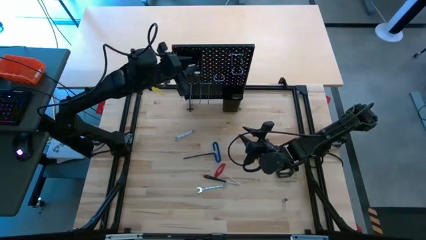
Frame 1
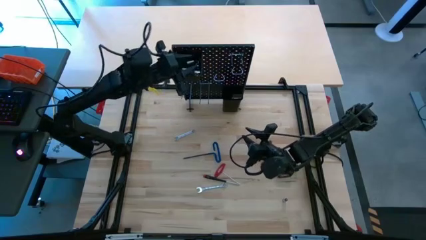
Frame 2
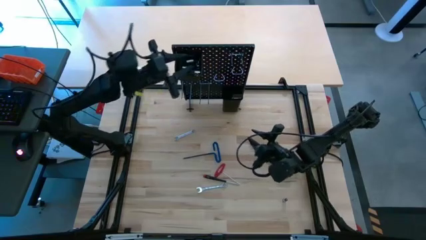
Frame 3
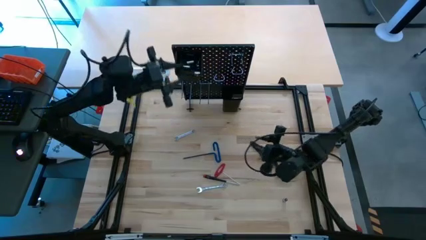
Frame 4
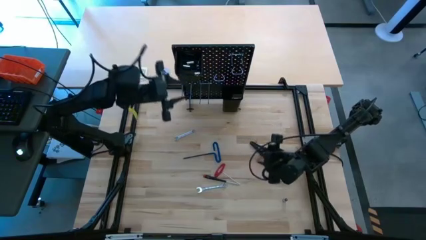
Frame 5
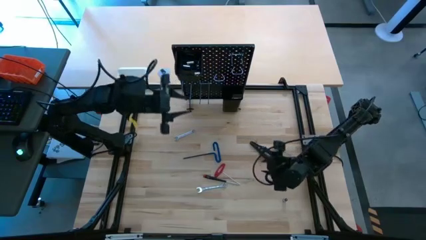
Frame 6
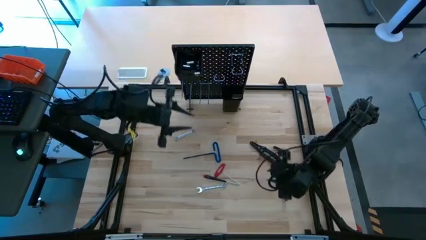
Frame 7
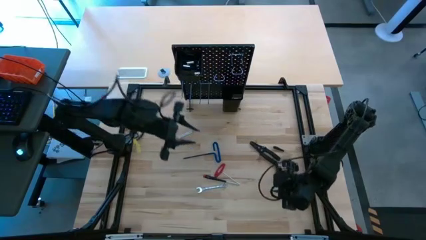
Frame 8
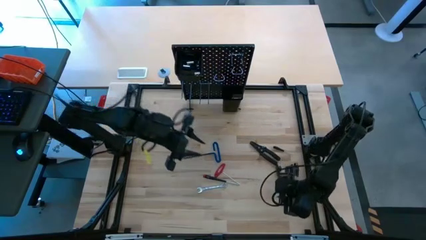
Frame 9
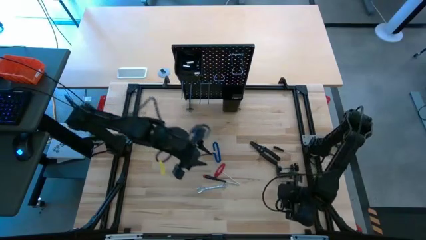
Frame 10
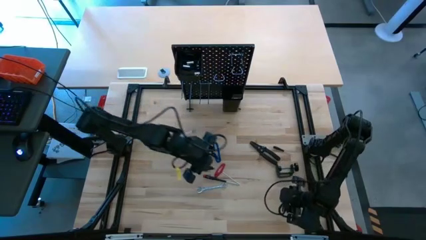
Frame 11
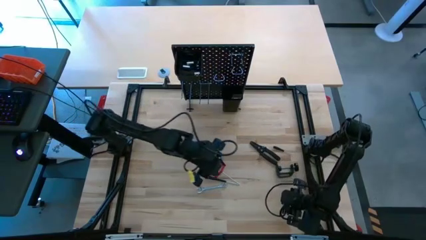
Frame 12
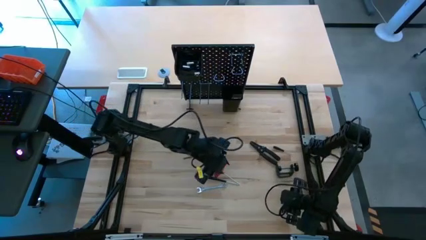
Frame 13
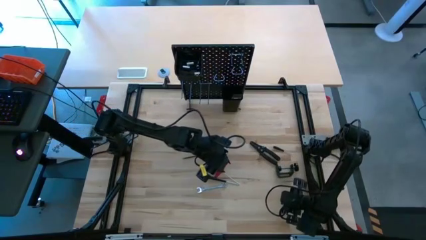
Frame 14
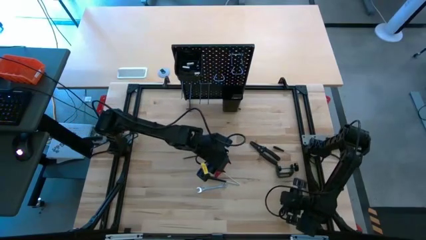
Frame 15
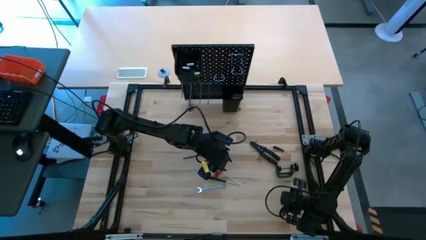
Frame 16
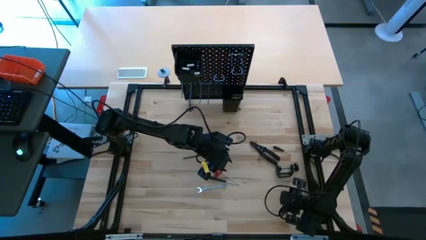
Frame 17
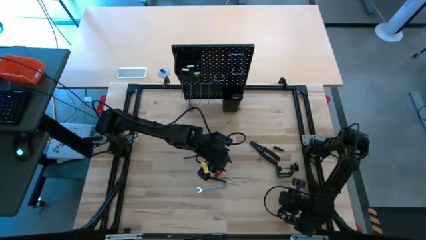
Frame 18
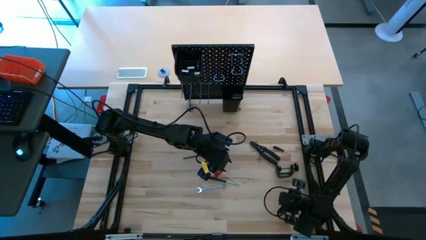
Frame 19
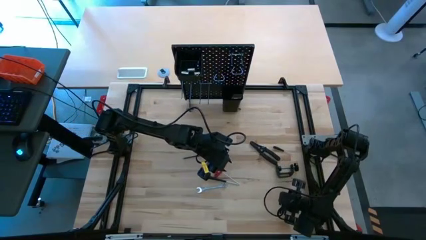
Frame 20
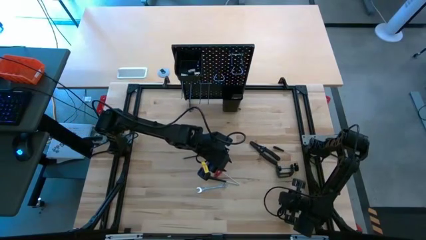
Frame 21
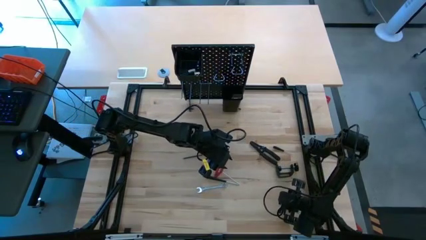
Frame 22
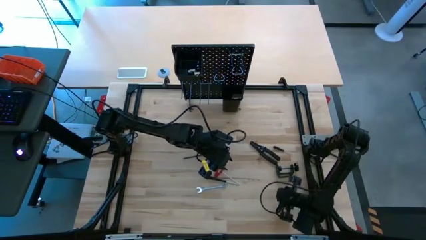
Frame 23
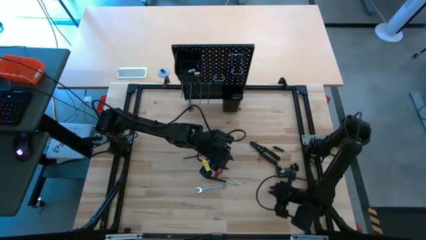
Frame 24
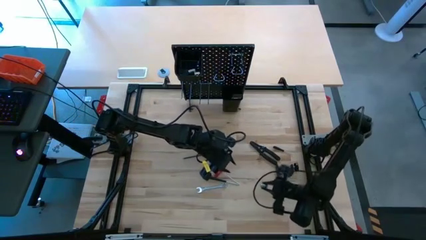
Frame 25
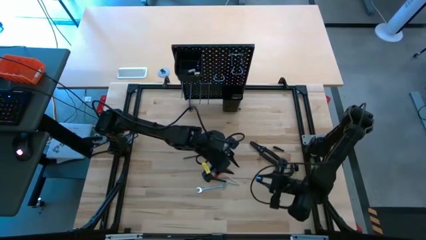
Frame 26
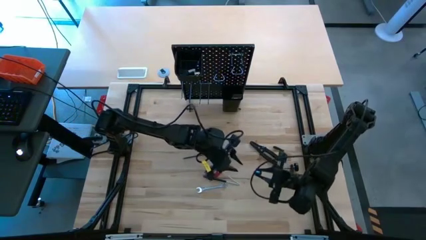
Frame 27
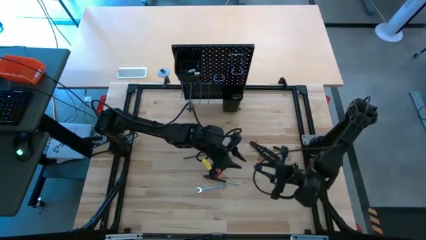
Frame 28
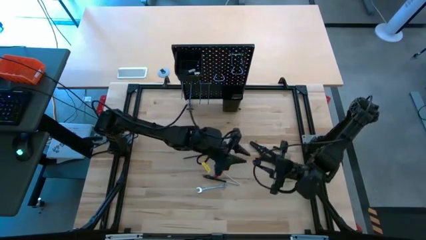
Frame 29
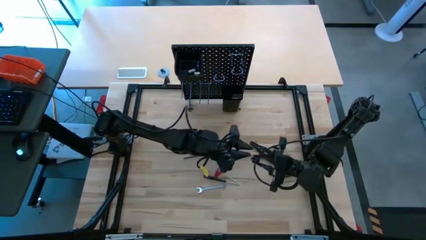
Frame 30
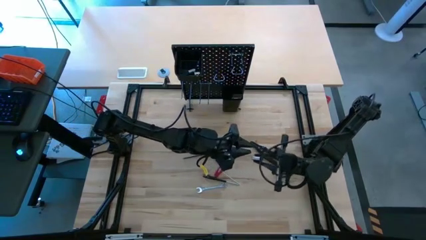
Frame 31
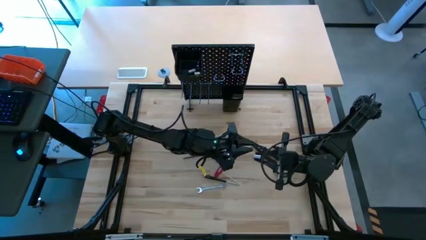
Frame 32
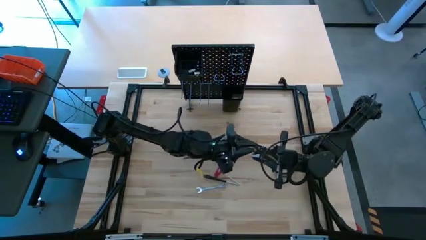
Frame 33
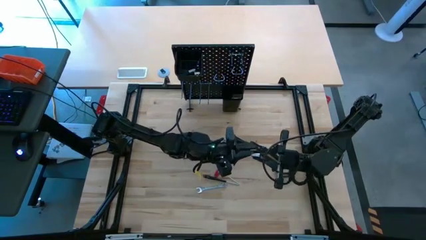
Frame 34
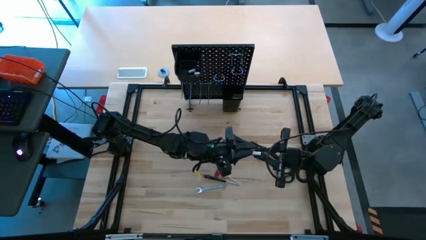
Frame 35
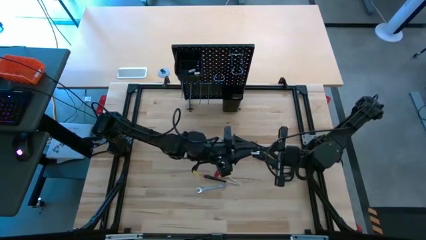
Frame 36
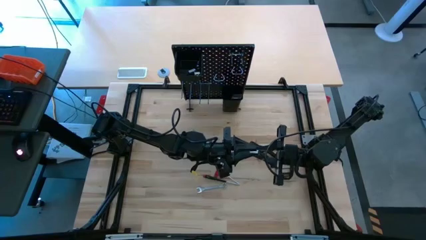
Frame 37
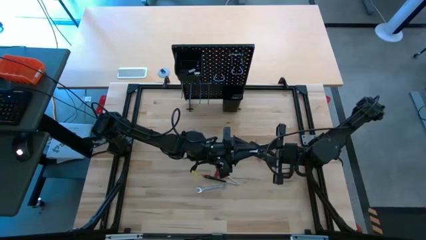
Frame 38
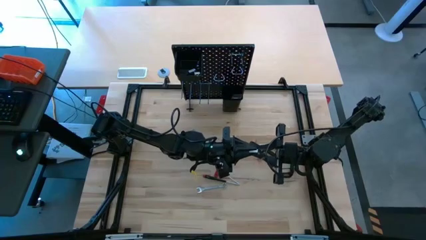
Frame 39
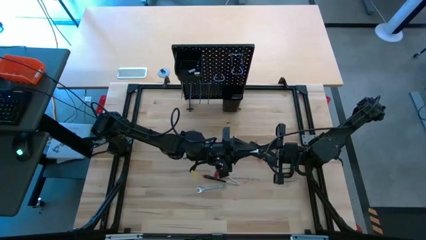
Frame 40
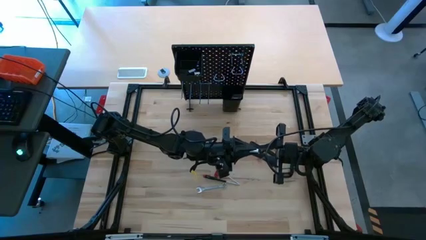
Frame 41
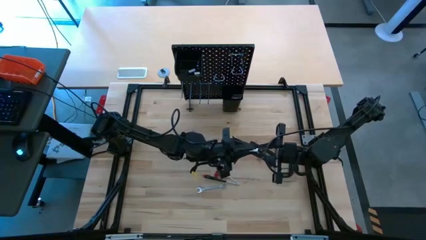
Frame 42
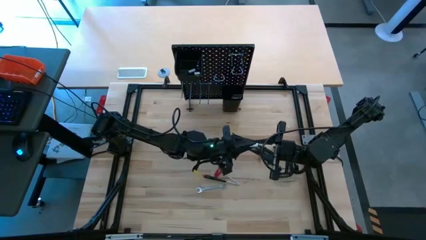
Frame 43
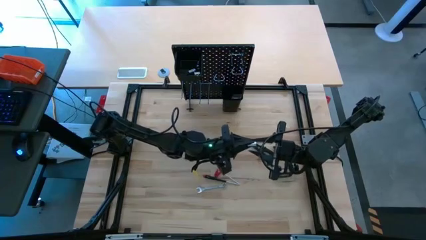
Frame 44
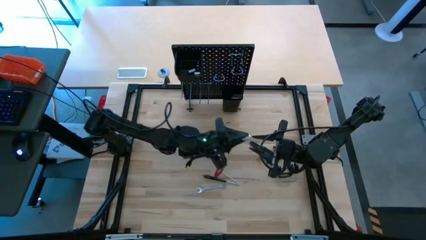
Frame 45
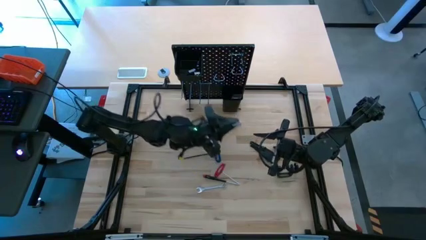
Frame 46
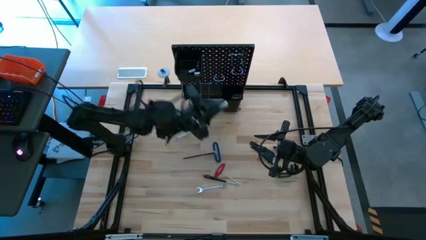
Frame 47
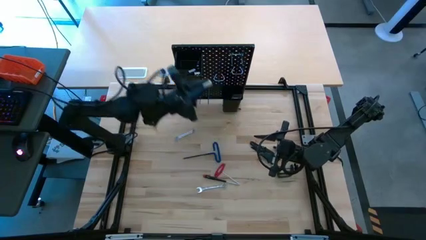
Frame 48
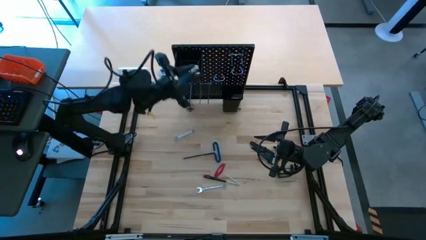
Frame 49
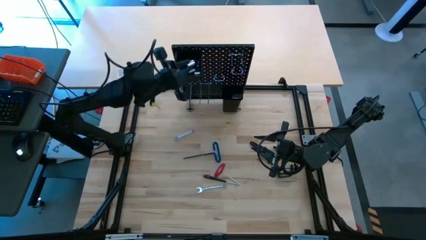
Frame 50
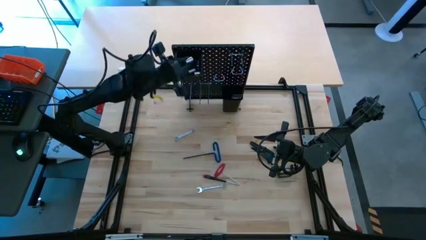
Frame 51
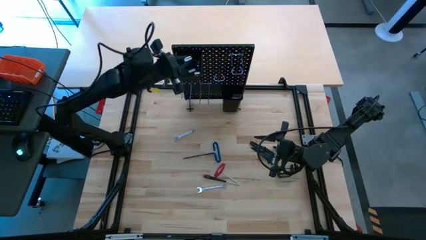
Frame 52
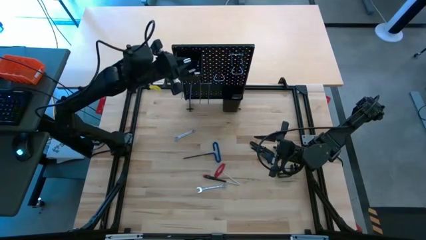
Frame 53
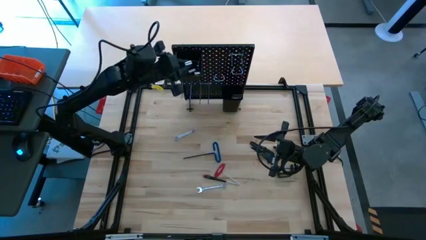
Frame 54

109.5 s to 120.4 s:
Task: Hang tools onto peg board
Put the socket into the top black bin on the pegboard
